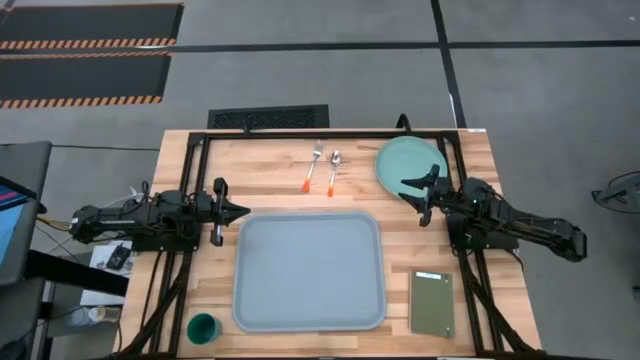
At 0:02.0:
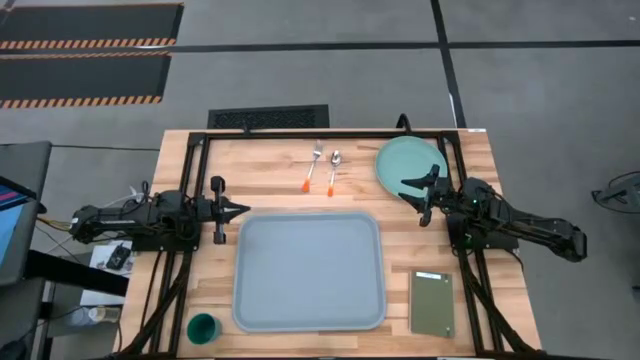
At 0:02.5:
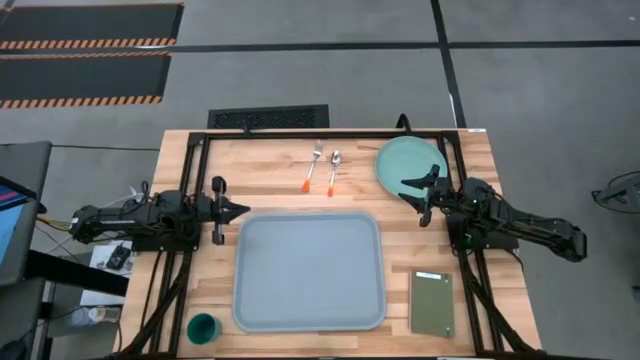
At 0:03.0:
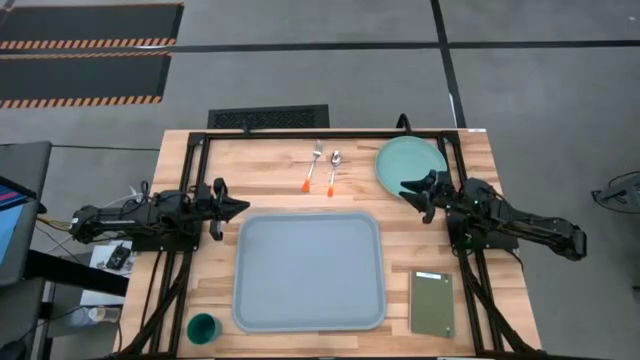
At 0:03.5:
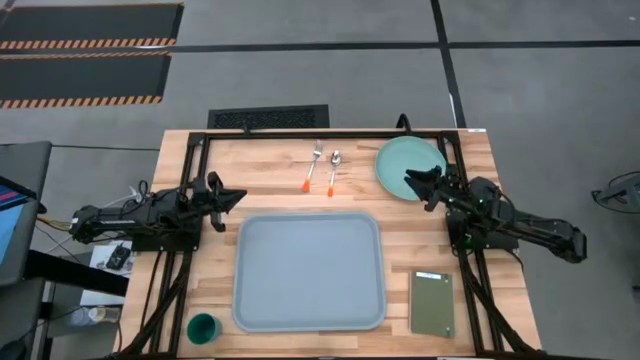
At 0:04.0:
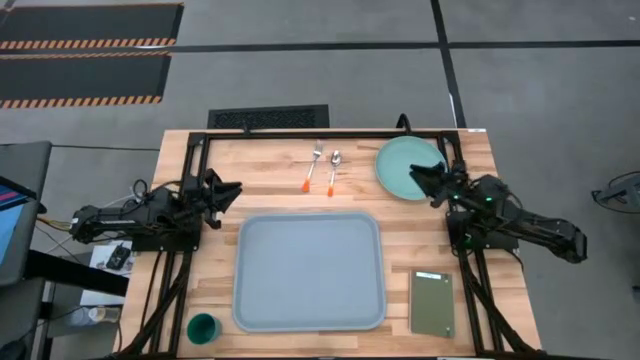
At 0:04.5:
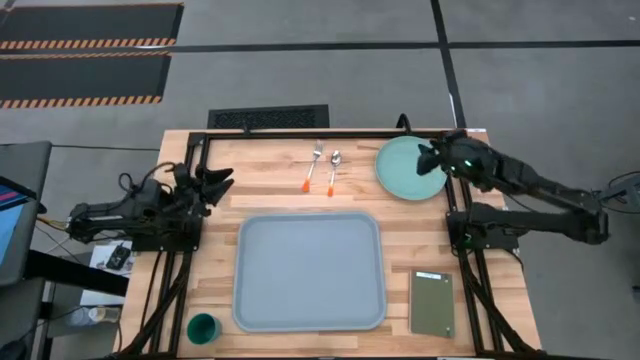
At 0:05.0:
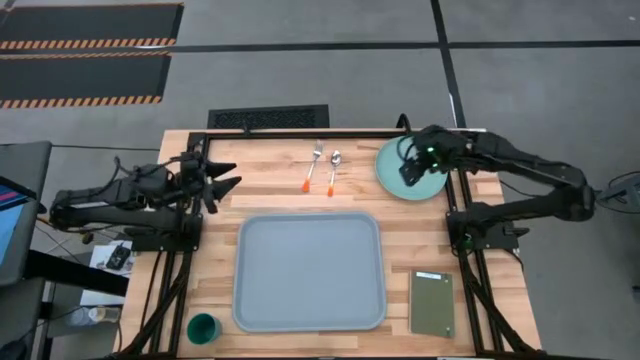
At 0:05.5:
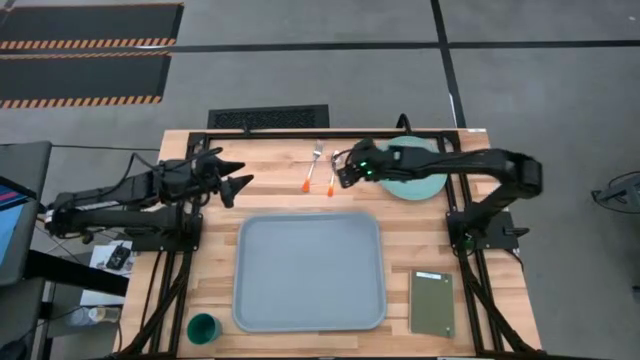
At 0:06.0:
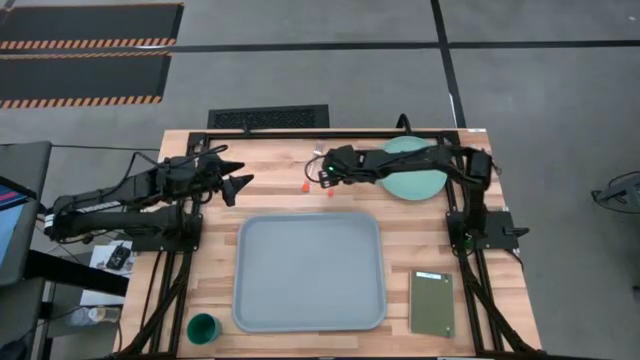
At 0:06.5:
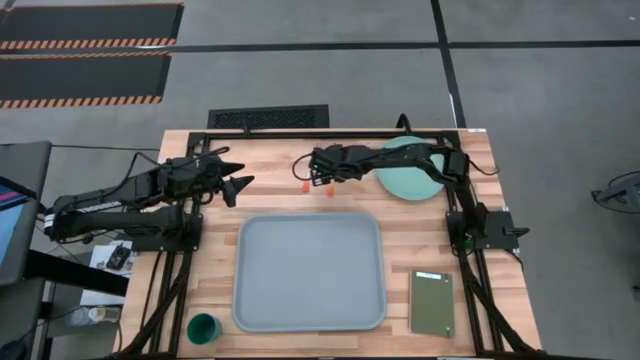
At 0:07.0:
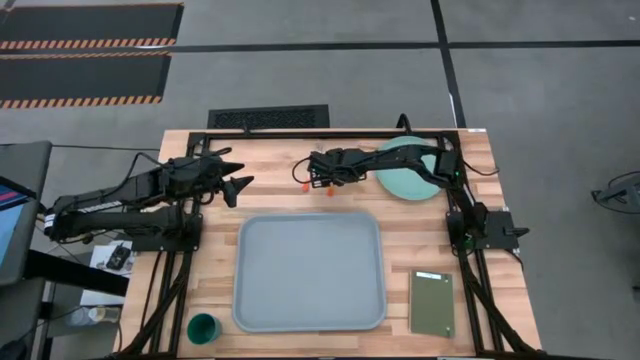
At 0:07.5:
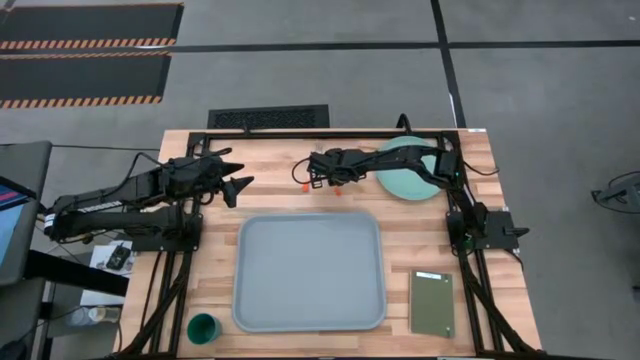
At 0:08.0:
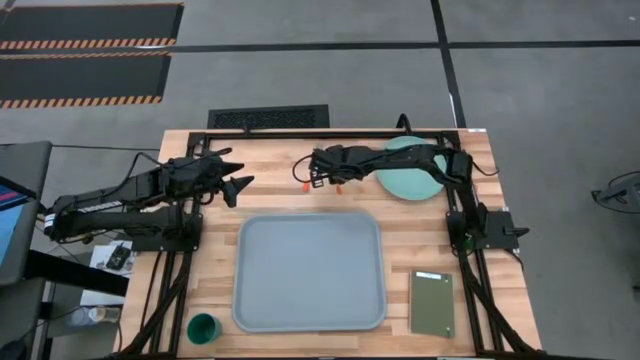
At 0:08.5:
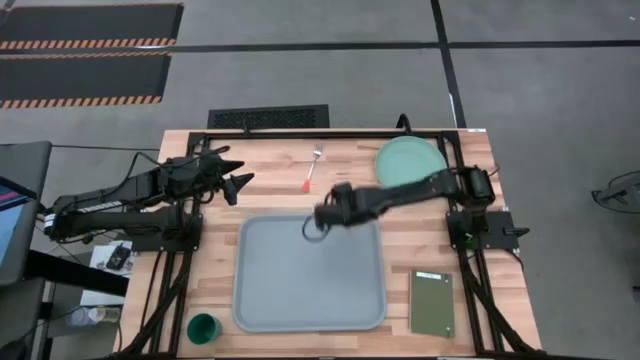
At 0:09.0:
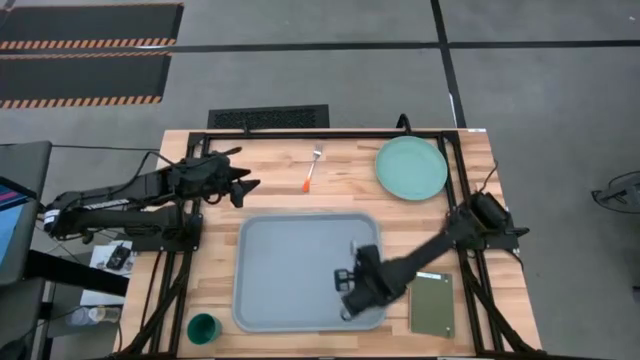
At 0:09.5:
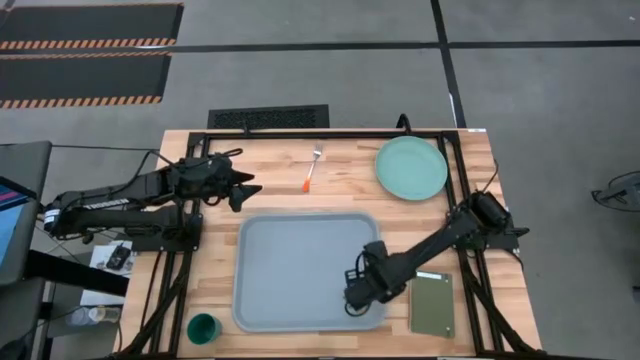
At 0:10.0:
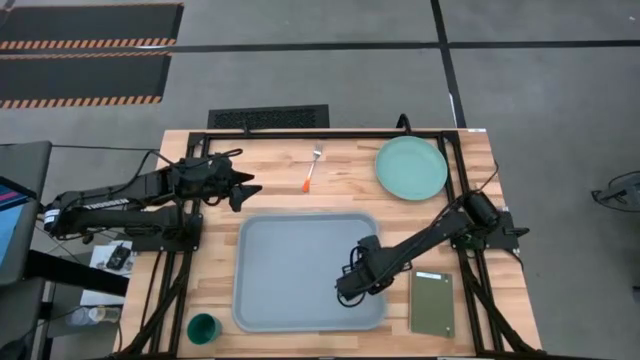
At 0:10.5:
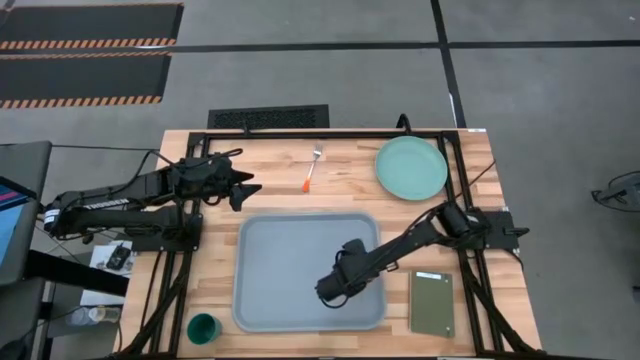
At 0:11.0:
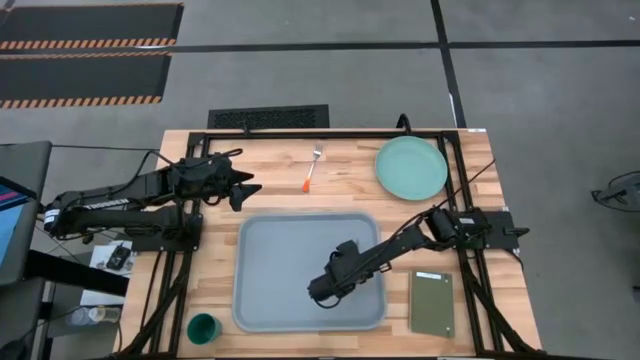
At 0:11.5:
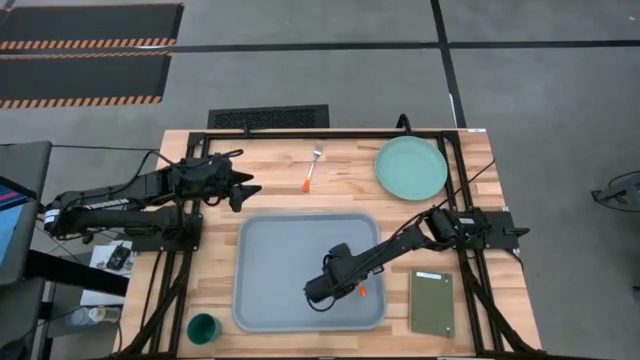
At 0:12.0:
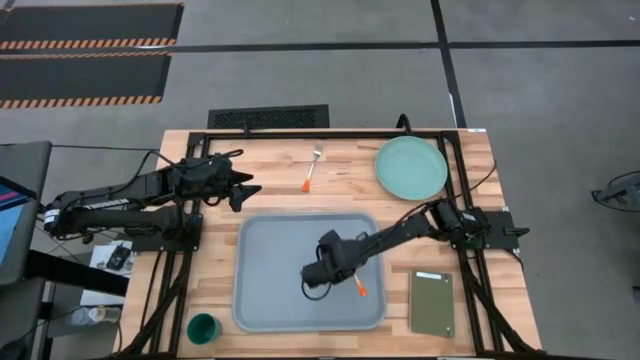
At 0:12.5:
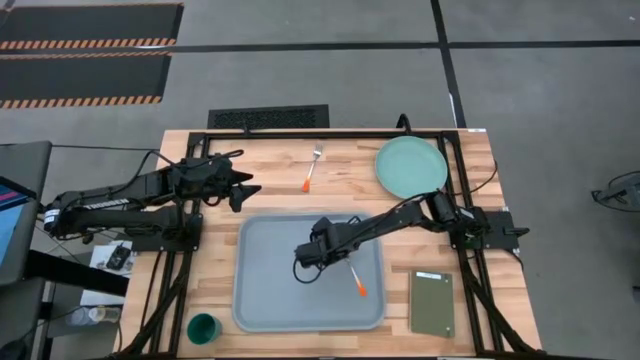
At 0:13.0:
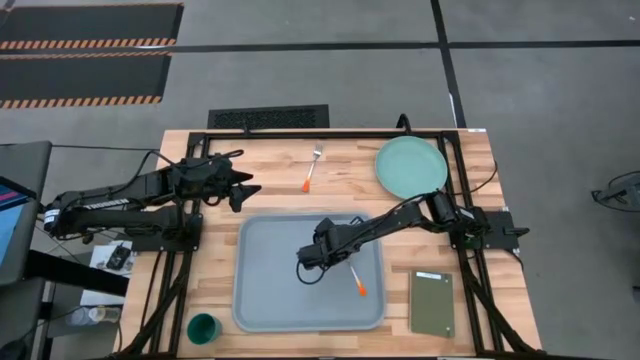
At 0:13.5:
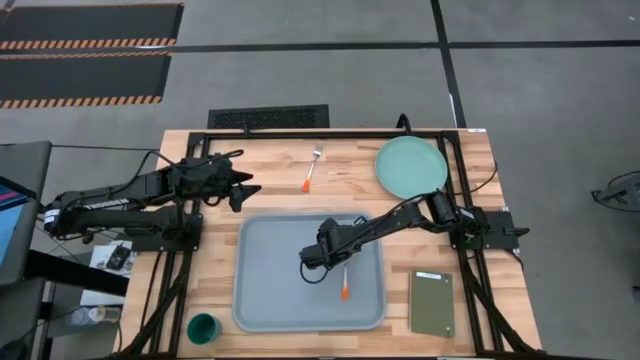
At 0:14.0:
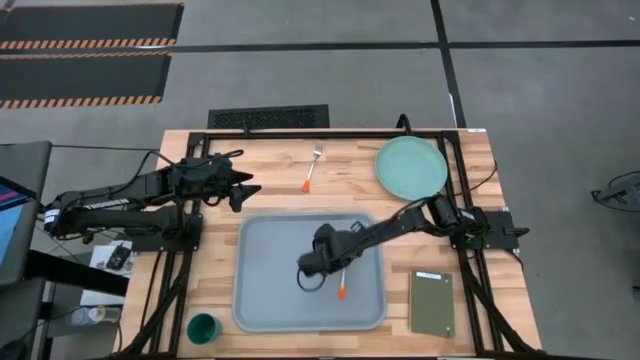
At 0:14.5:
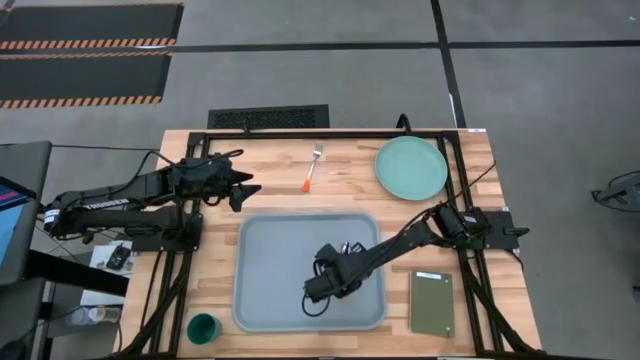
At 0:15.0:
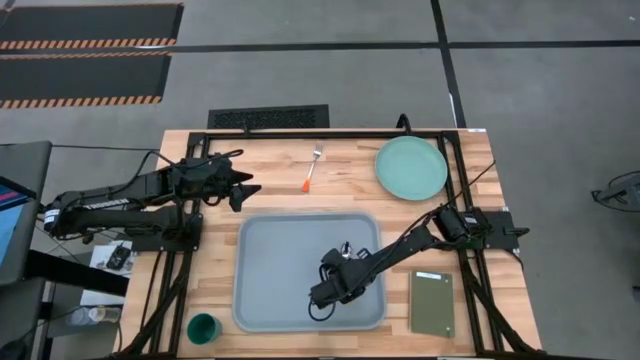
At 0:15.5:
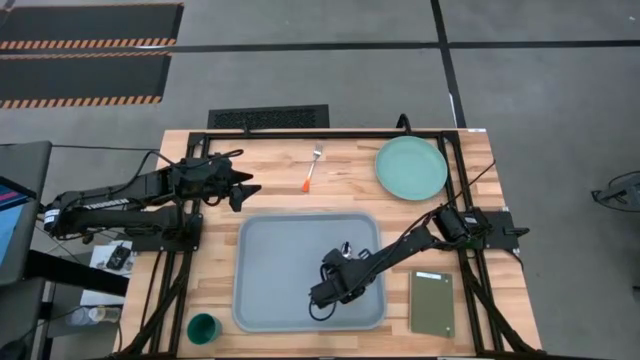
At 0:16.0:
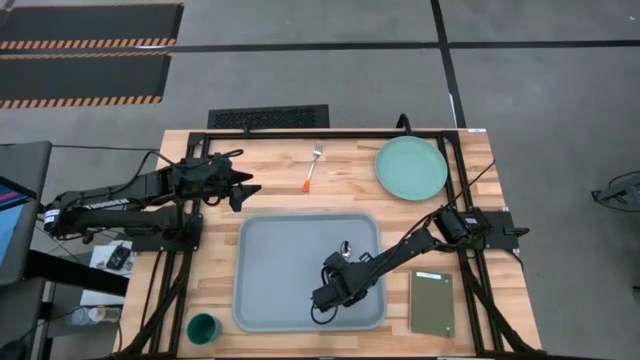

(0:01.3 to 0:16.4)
Task: Pick and place plate/cup/fork/spoon on tray
Put the orange spoon on the right of the gray tray

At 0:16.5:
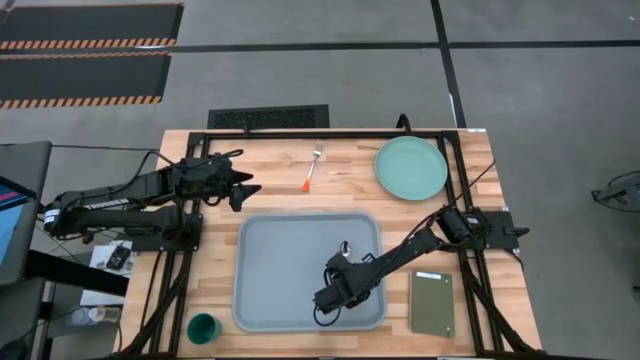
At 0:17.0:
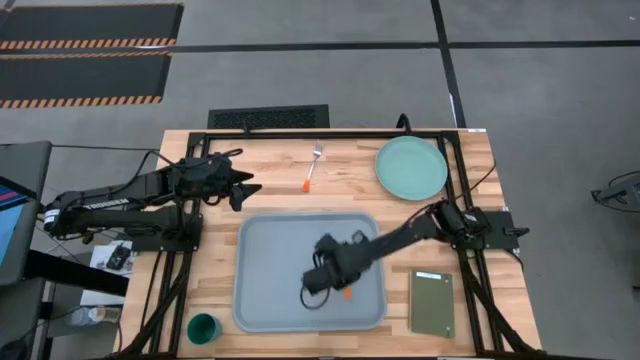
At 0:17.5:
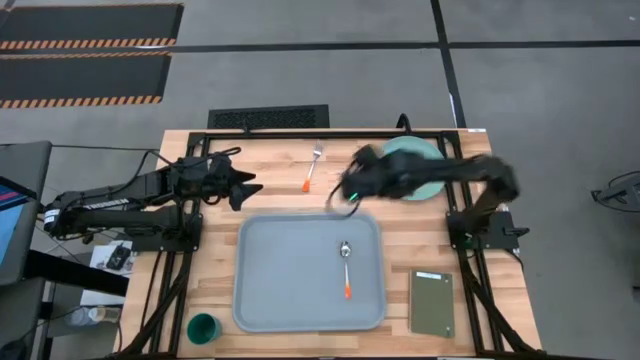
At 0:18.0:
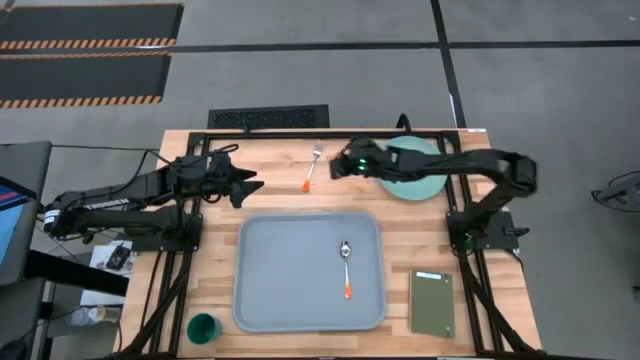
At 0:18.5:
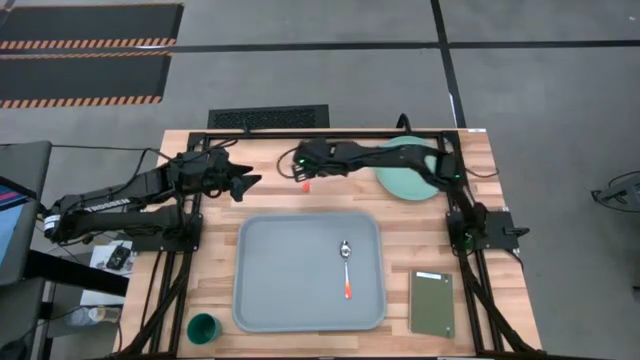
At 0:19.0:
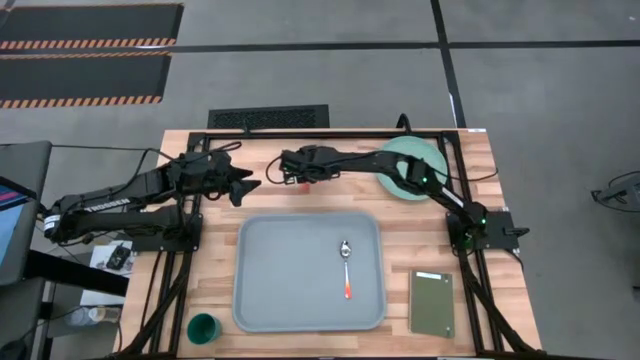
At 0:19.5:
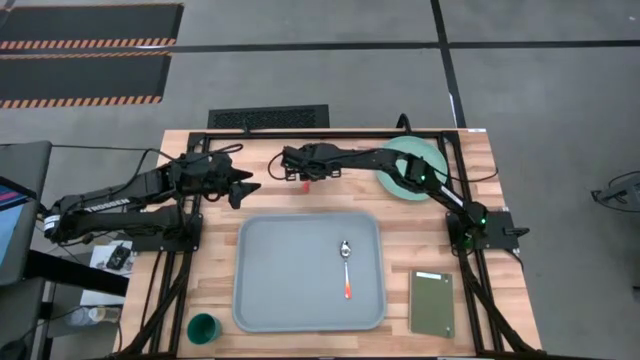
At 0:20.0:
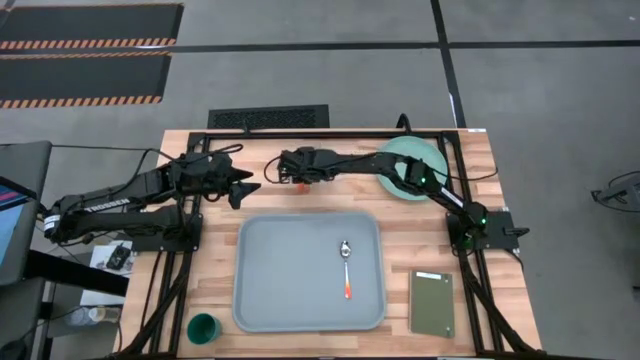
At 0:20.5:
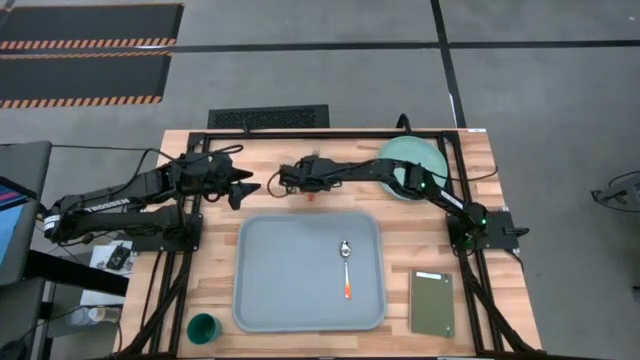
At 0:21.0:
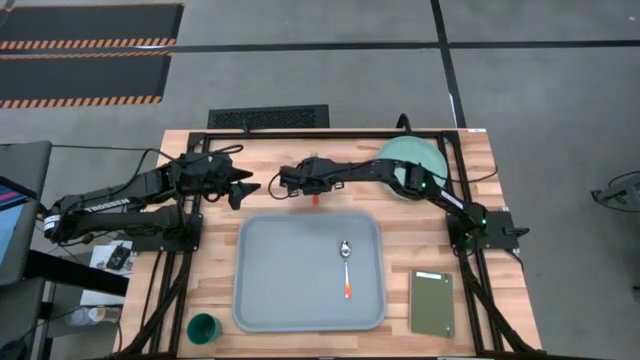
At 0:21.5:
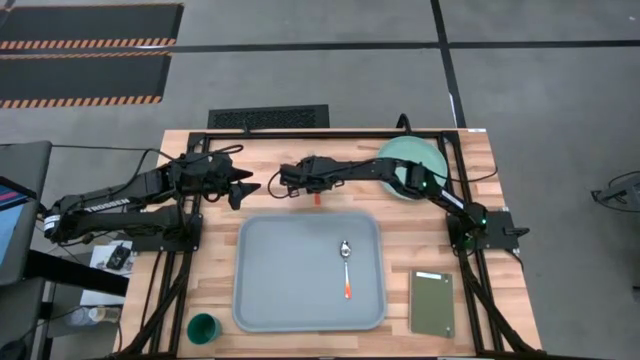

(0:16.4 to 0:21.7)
Put the orange fork on the gray tray to the left of the orange spoon
